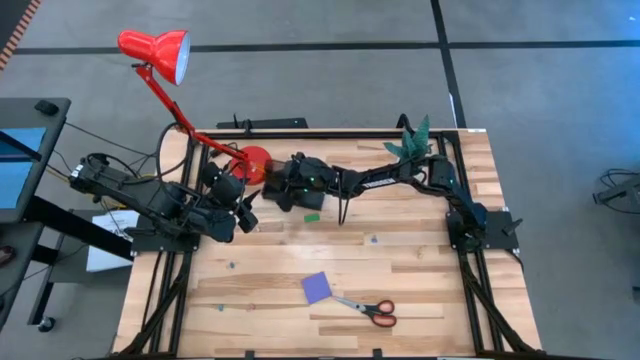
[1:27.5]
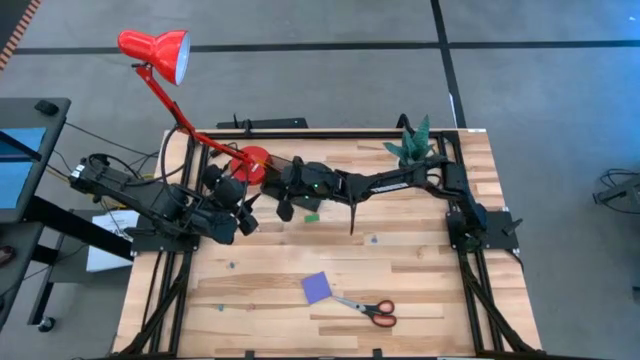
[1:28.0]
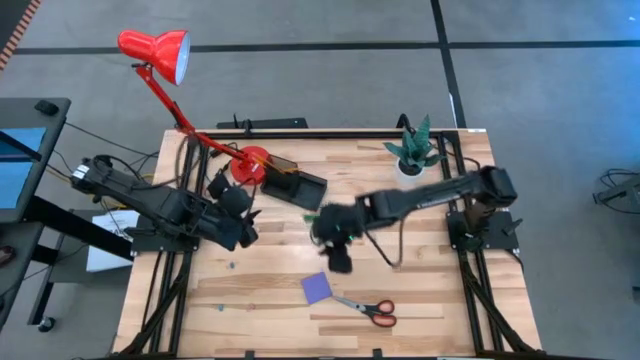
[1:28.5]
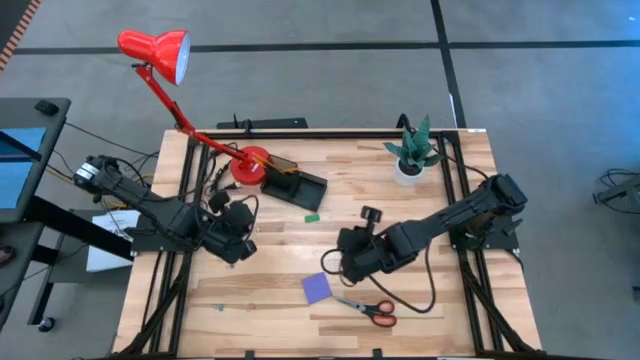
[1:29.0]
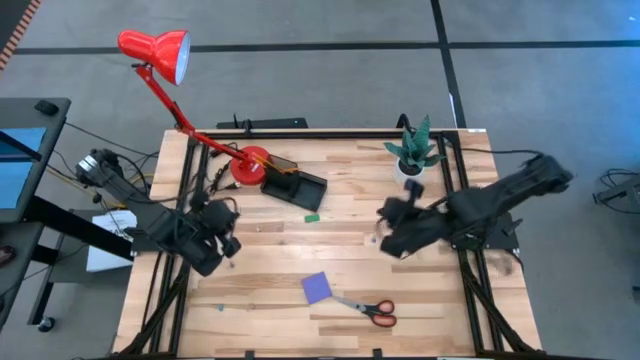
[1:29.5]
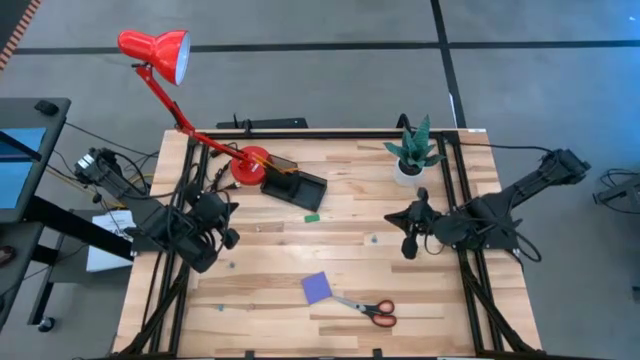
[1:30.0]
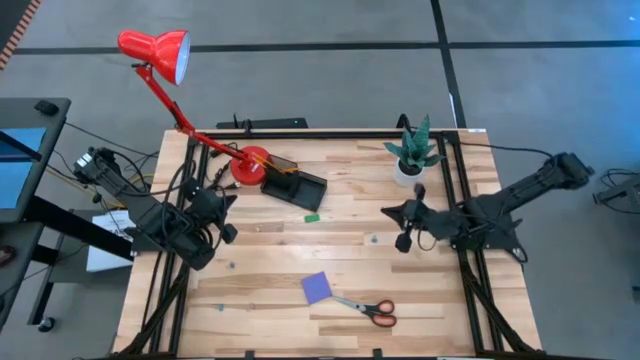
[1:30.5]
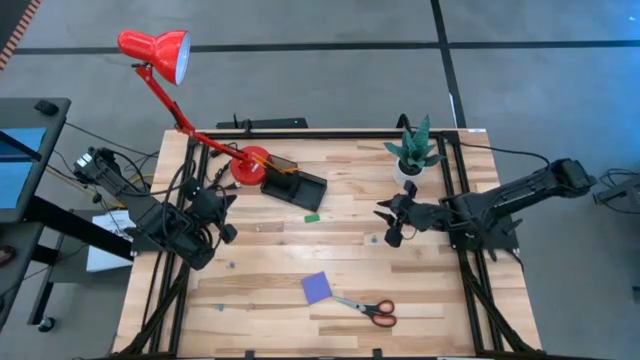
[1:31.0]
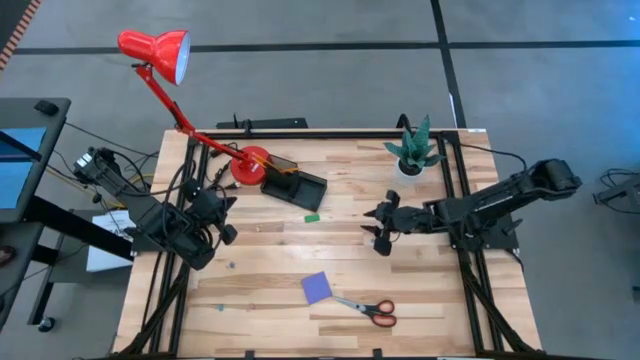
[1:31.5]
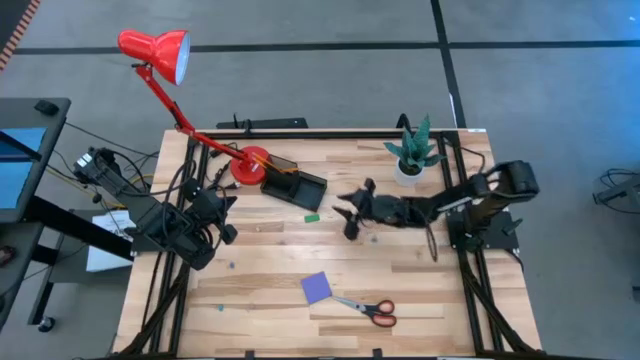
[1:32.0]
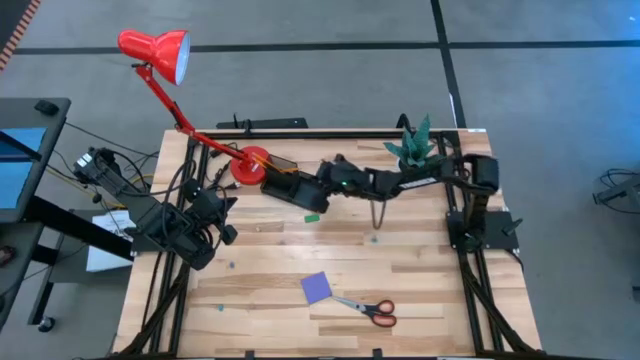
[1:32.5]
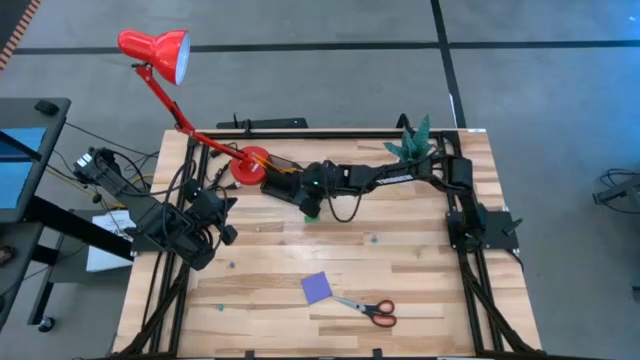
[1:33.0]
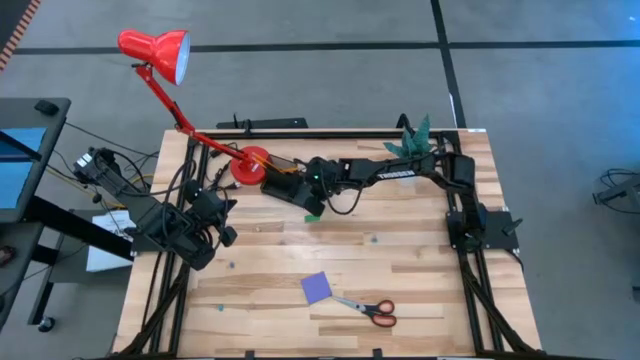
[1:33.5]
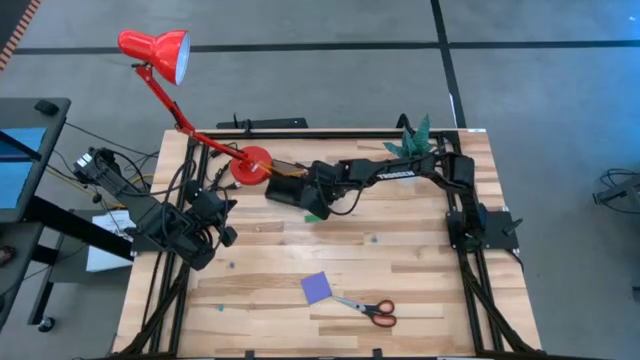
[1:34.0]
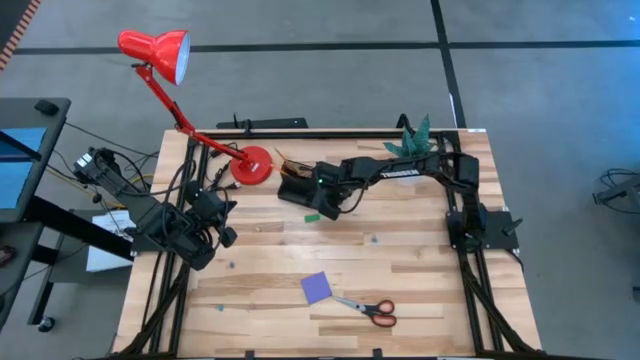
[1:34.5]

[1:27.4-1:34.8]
Task: Pick and place office supplies into organizer
Adjust the black desk organizer

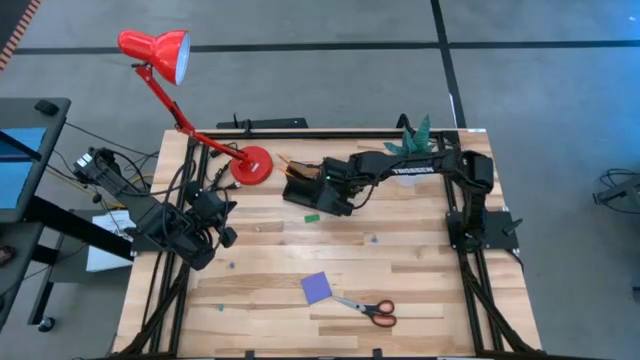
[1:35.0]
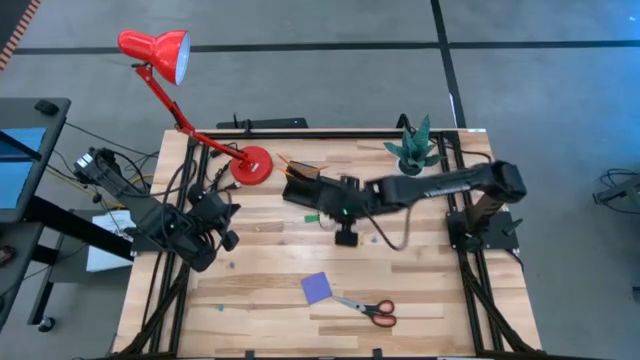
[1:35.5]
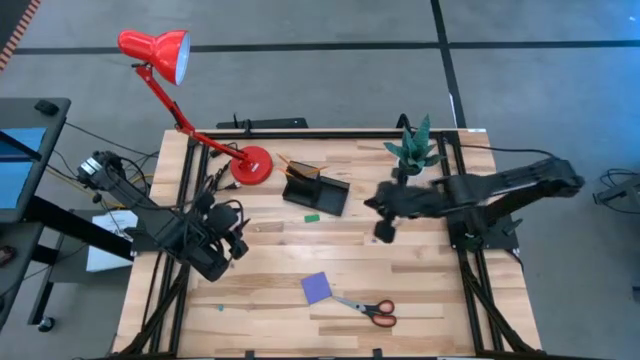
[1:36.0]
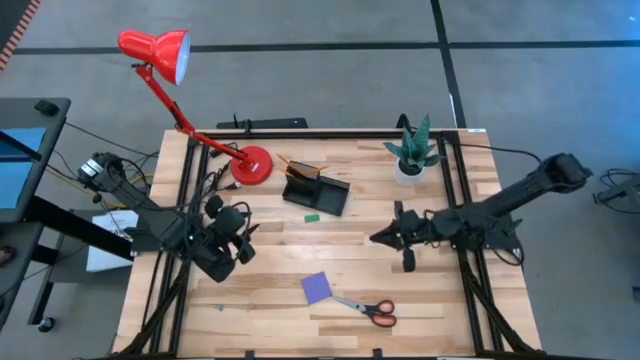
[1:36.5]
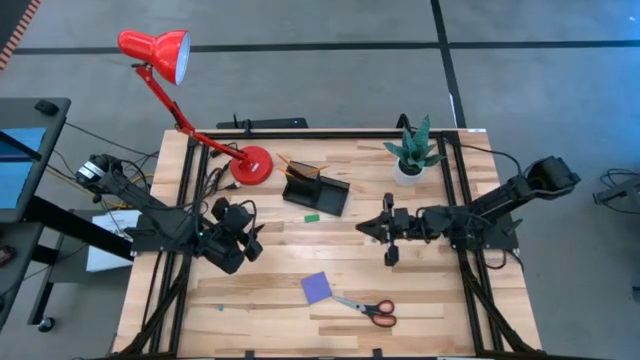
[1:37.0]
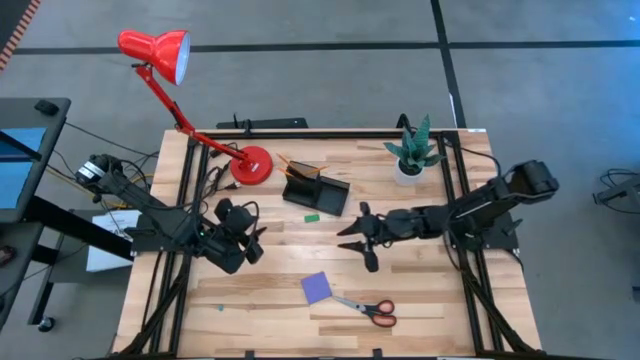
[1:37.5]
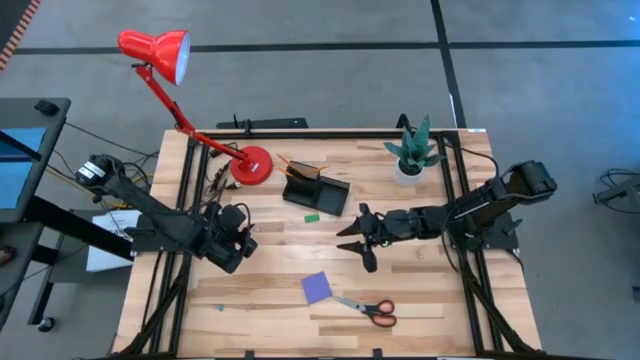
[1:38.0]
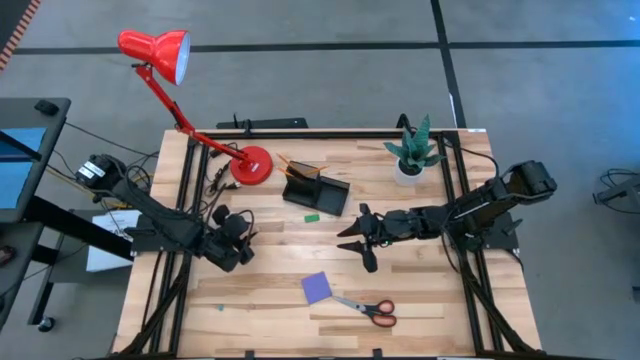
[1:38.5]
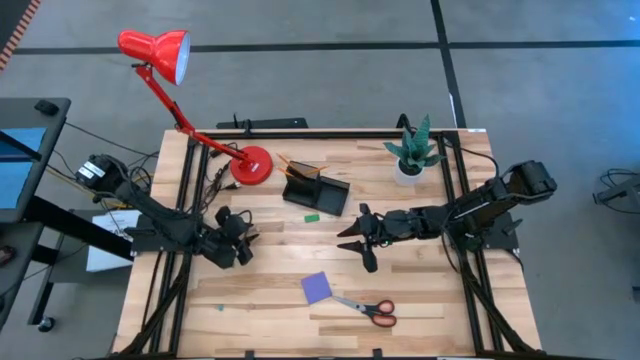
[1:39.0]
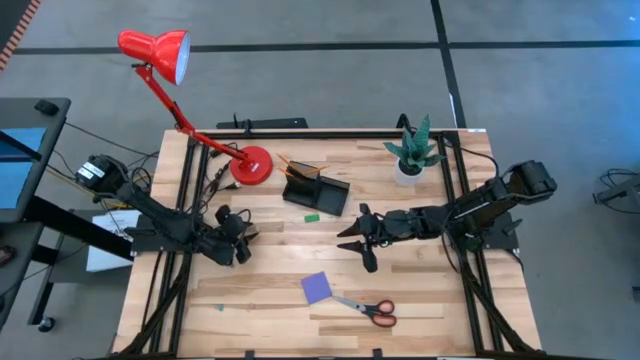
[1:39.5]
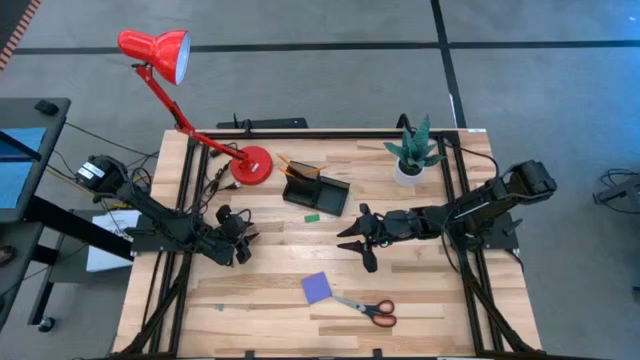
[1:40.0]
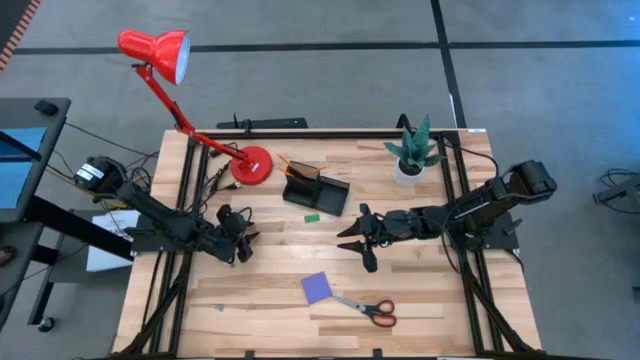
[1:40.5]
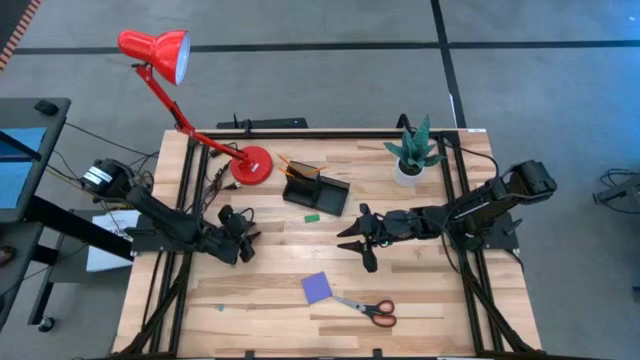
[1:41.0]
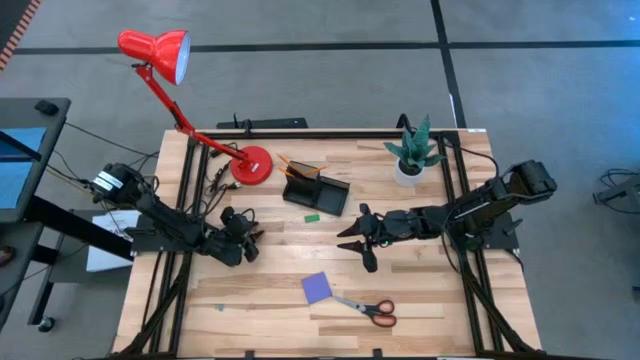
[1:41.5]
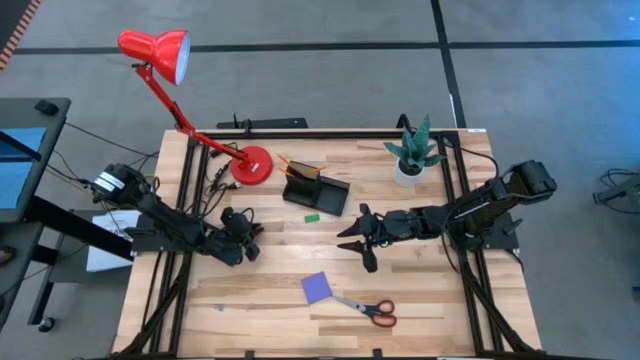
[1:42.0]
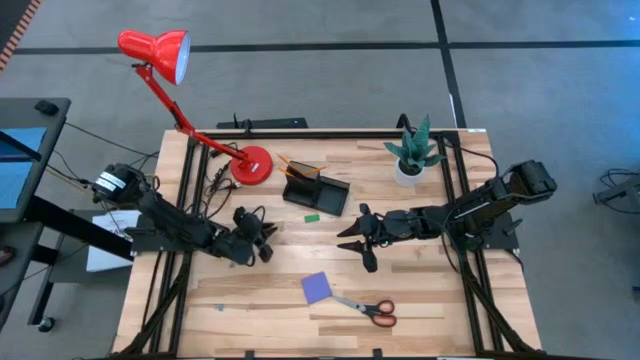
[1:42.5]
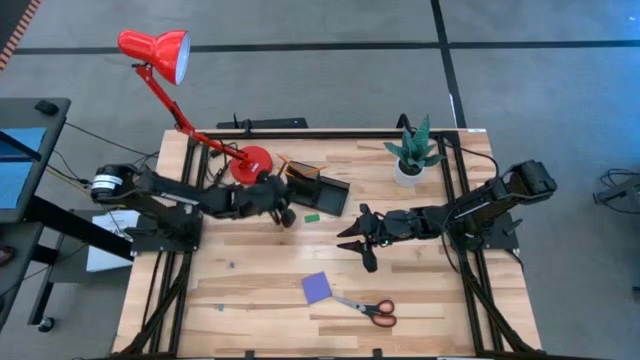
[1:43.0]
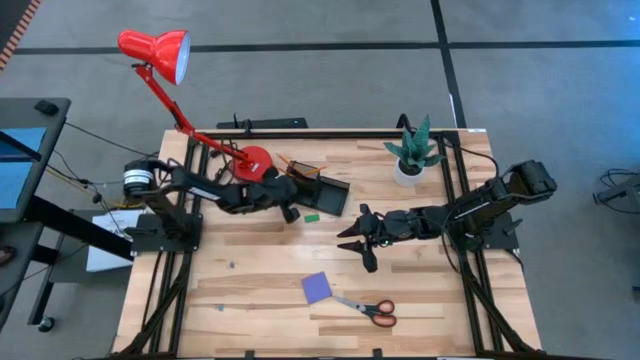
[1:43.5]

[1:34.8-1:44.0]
Put the left yellow binder clip into the black desk organizer

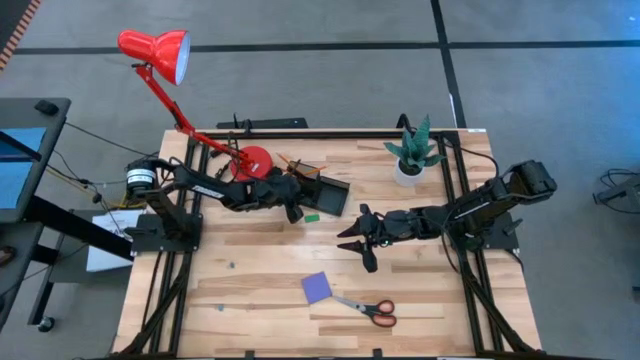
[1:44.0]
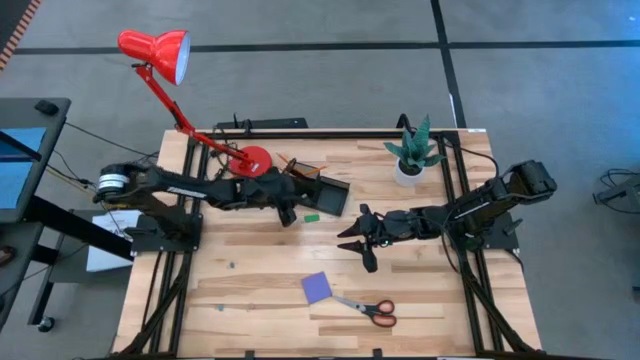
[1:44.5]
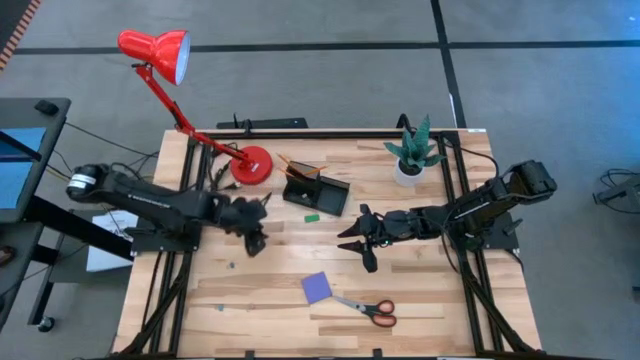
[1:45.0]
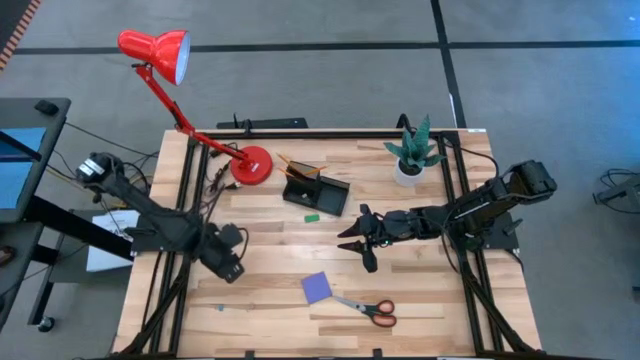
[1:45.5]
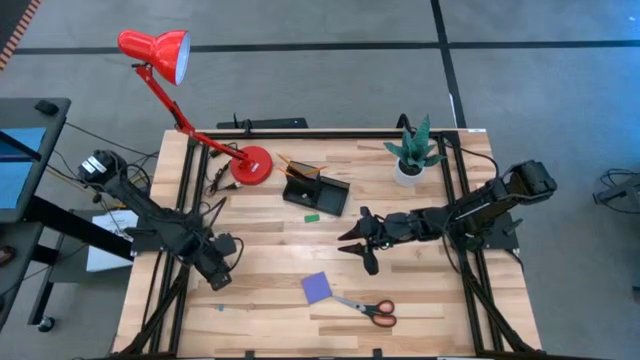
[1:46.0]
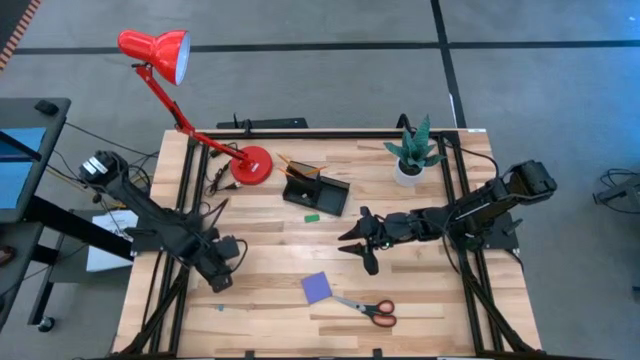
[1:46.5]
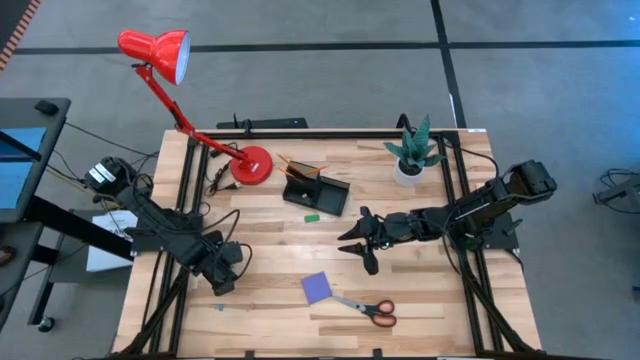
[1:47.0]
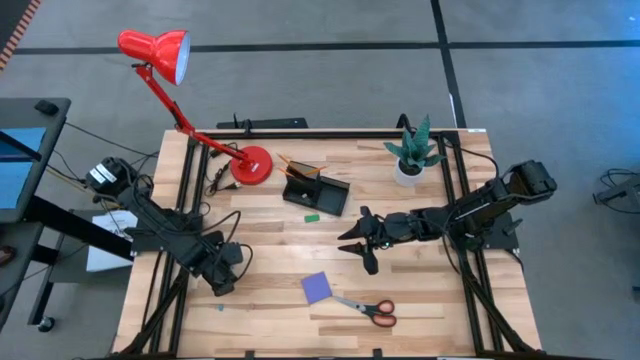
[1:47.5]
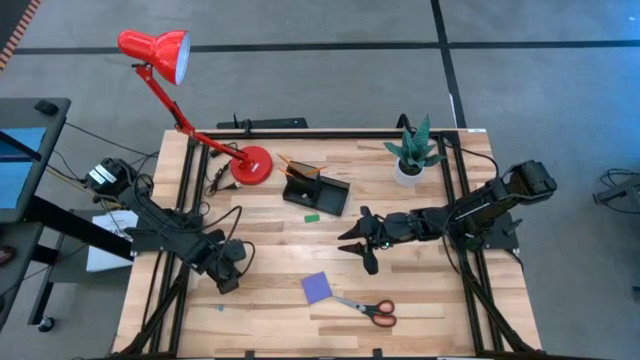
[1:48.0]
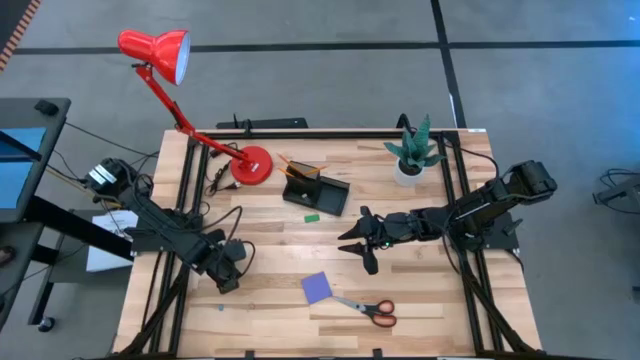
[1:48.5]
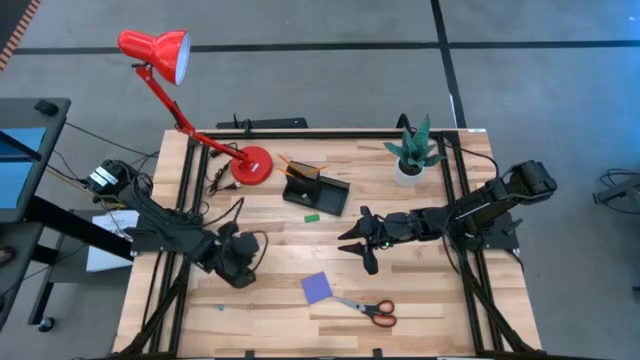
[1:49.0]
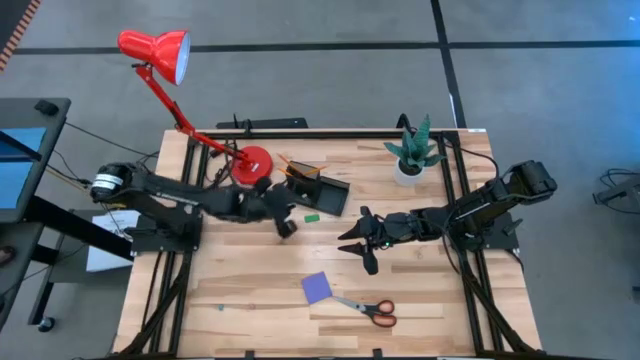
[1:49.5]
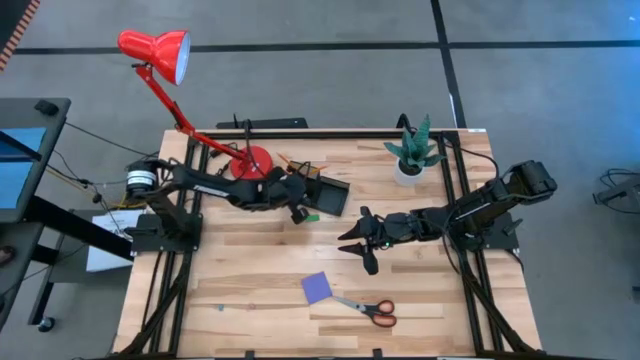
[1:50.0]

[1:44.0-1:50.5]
Put the top left blue binder clip into the black desk organizer
